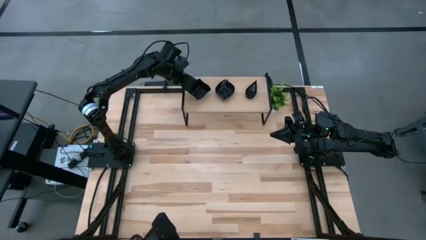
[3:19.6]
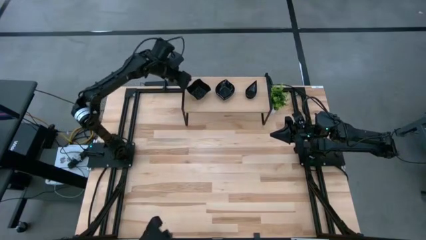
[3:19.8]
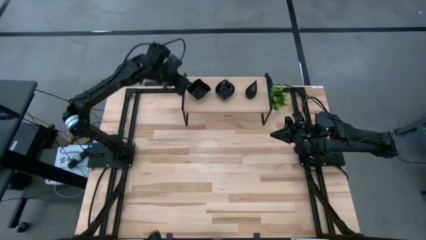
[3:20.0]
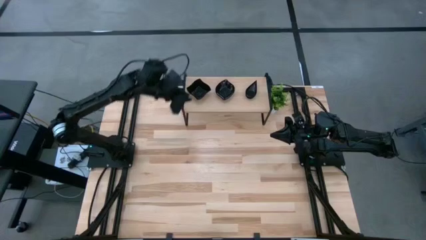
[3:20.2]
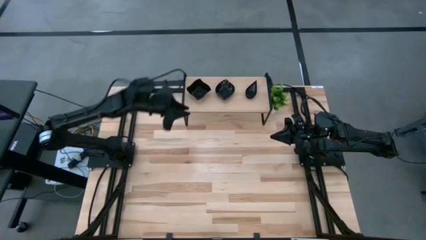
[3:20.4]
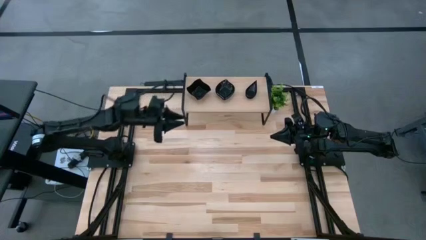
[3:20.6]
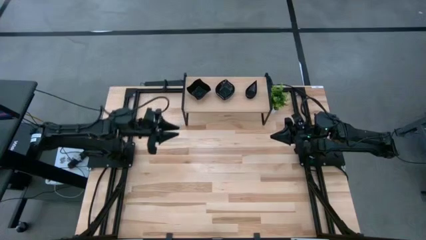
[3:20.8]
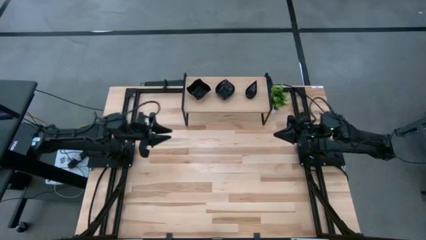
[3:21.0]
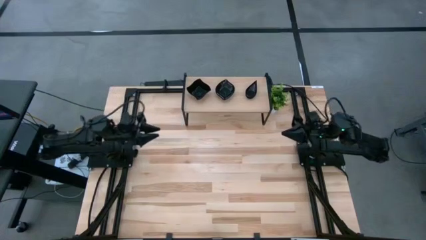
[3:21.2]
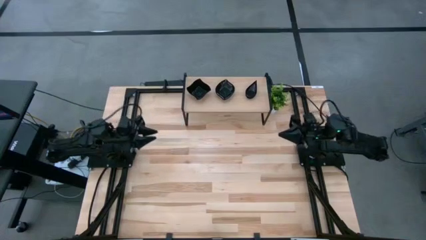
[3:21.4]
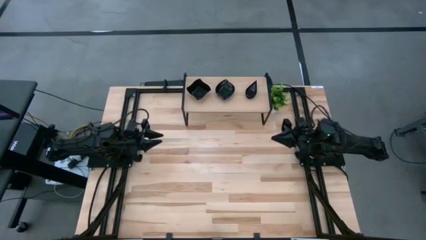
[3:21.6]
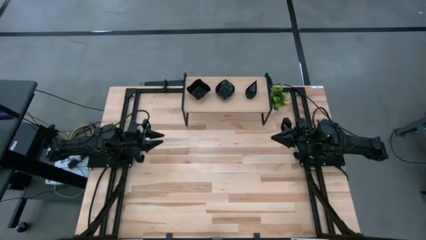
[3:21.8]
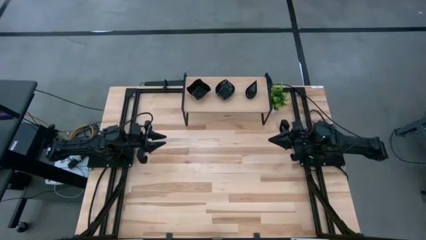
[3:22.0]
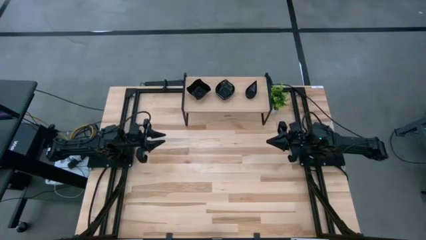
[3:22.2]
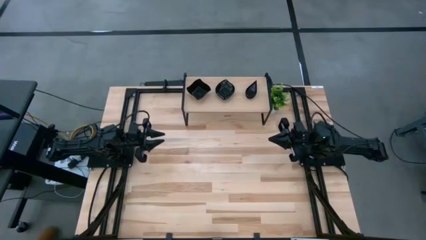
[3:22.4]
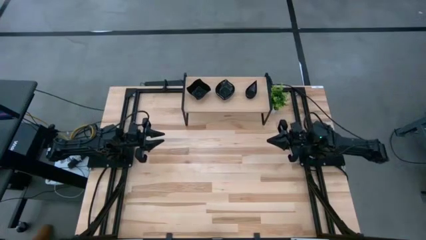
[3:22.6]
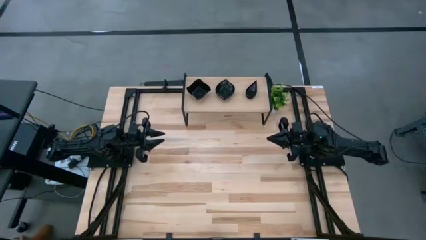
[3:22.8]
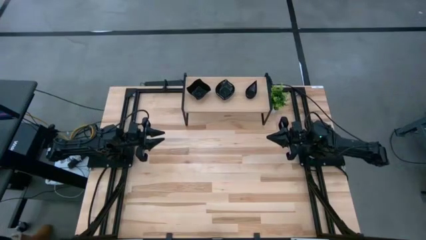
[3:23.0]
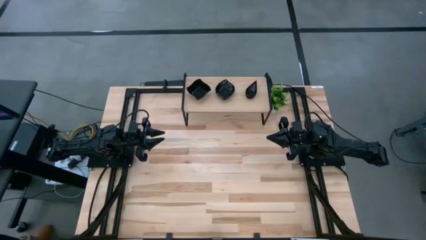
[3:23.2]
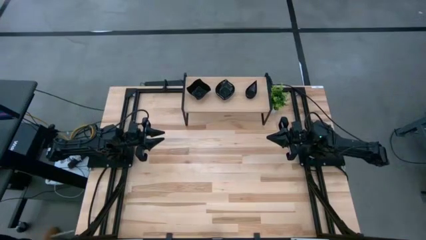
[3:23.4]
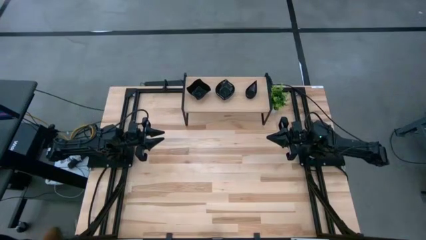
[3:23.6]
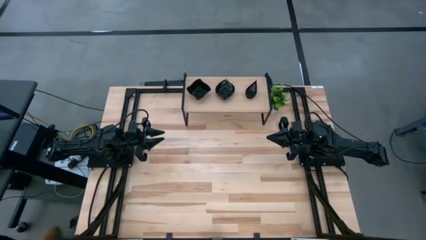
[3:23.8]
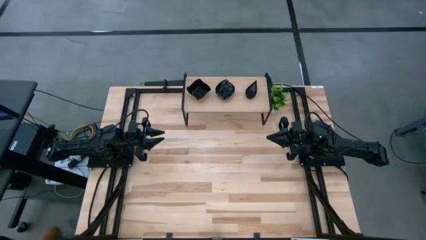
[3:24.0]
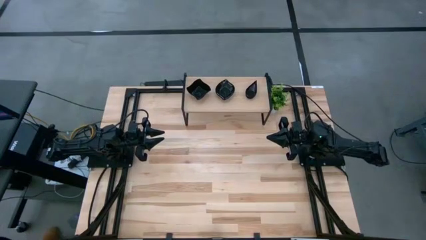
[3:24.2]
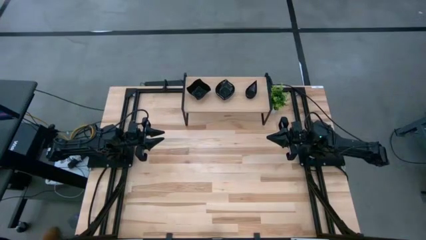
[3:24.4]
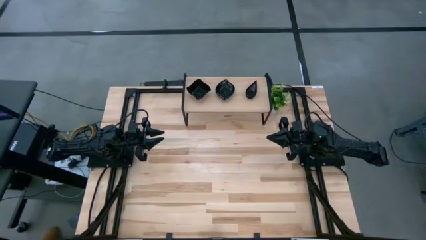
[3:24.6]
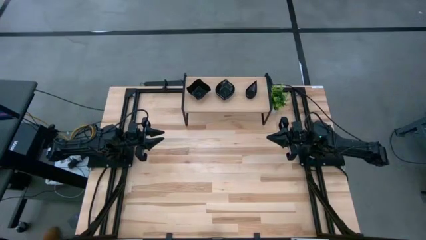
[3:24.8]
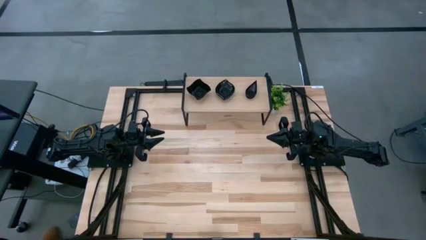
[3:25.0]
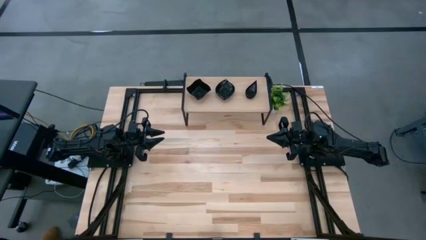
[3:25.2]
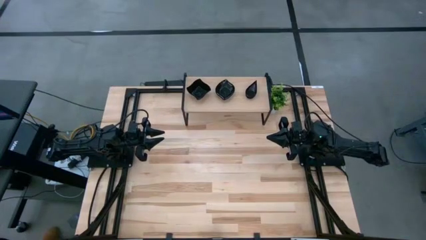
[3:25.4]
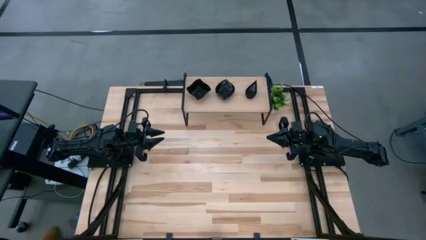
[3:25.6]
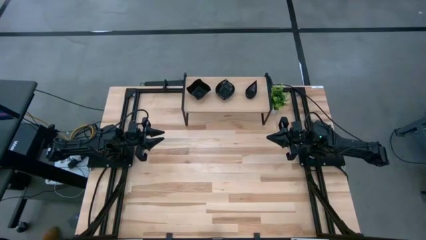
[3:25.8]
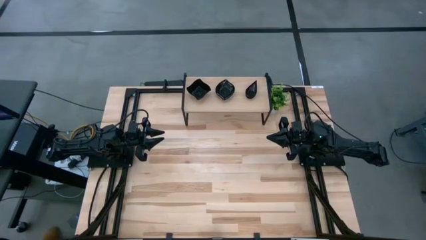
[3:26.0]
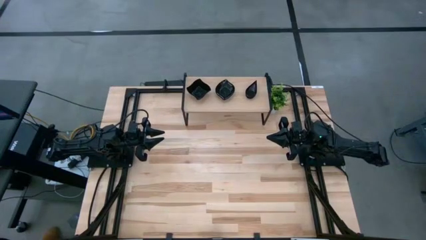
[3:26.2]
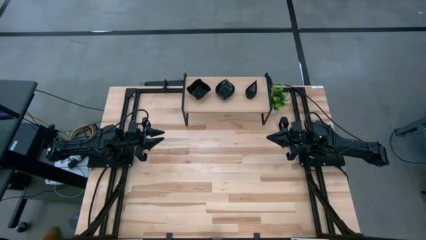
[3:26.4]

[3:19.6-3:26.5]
Task: Pick & Place Mini shaped plates
Return to Home Position

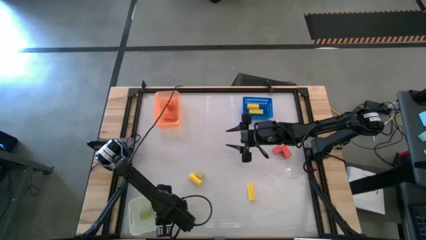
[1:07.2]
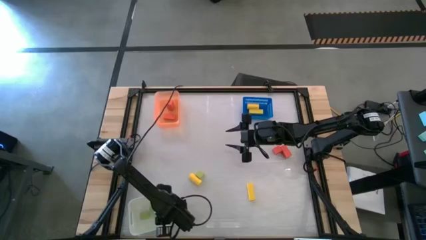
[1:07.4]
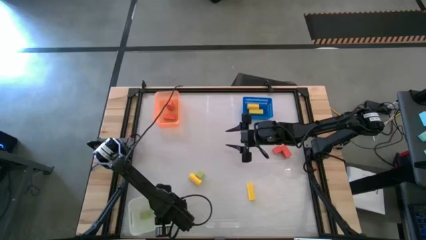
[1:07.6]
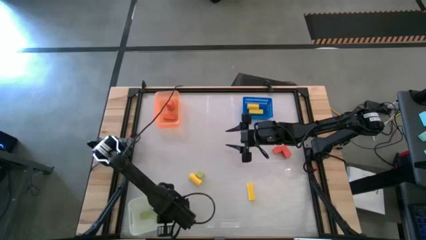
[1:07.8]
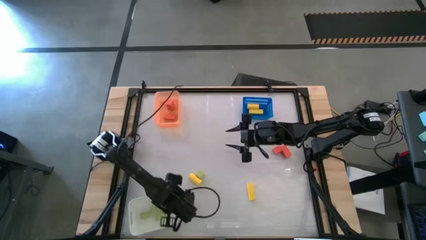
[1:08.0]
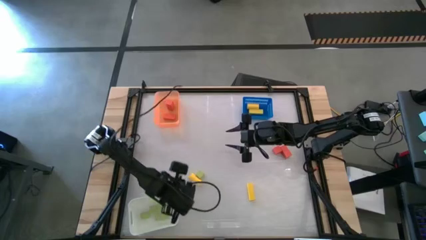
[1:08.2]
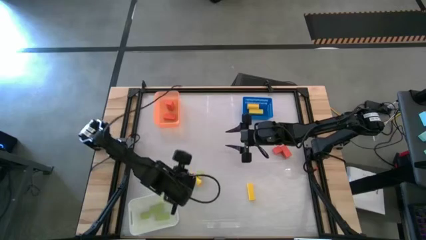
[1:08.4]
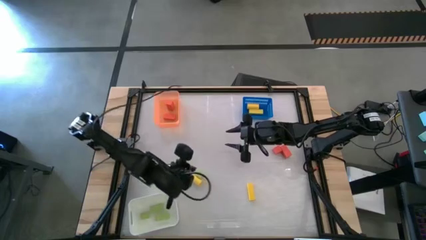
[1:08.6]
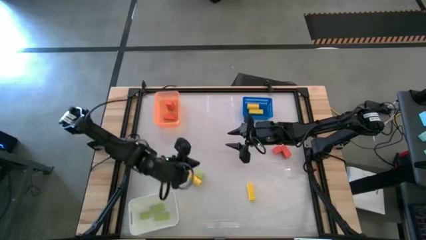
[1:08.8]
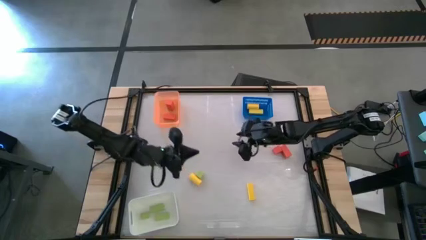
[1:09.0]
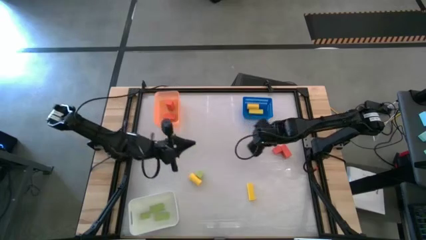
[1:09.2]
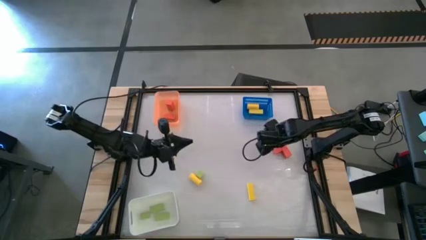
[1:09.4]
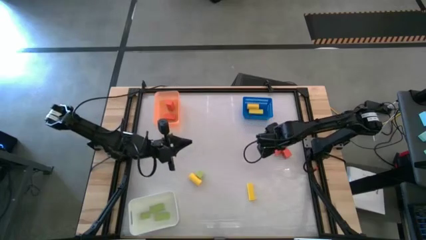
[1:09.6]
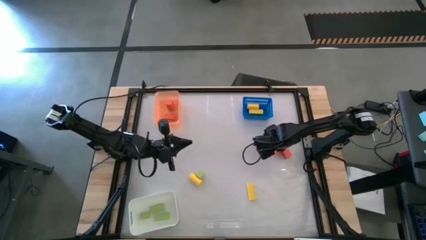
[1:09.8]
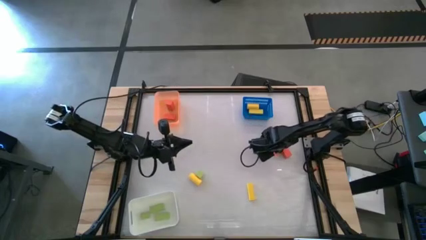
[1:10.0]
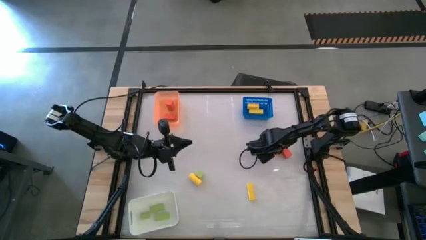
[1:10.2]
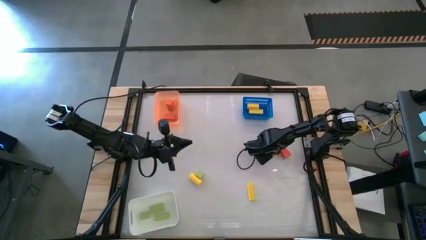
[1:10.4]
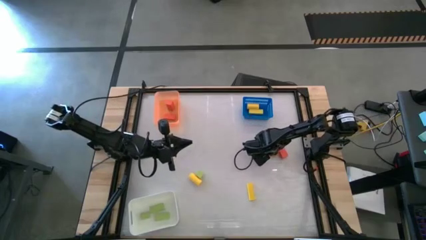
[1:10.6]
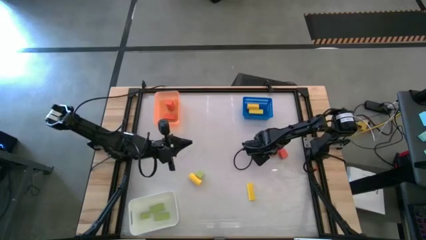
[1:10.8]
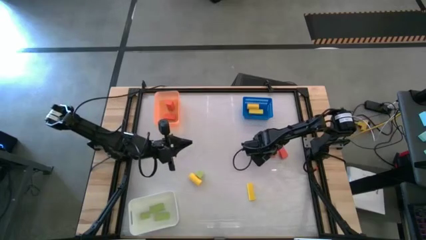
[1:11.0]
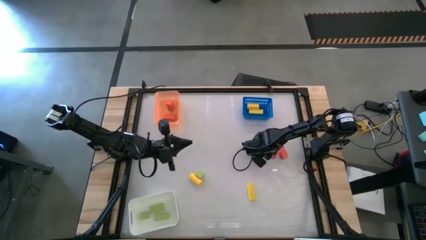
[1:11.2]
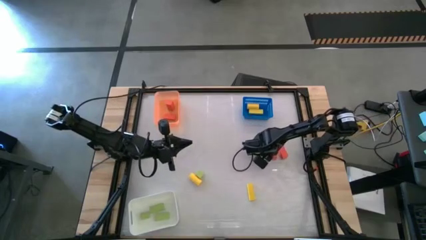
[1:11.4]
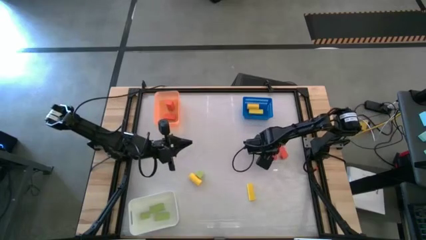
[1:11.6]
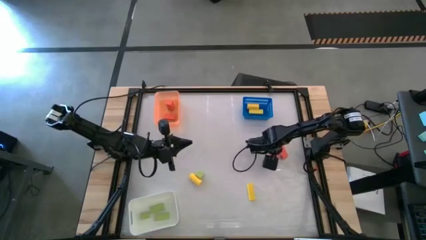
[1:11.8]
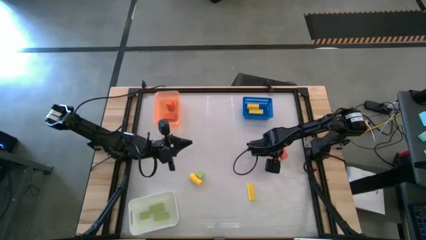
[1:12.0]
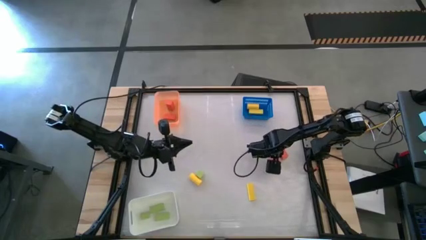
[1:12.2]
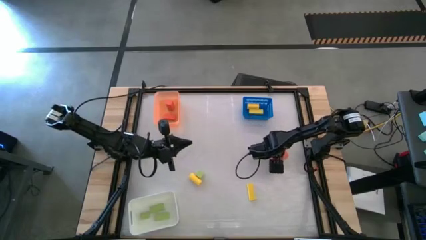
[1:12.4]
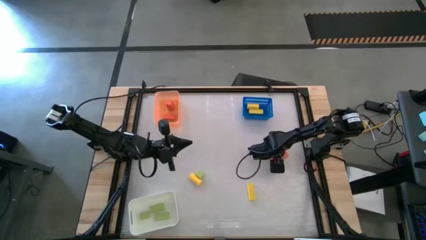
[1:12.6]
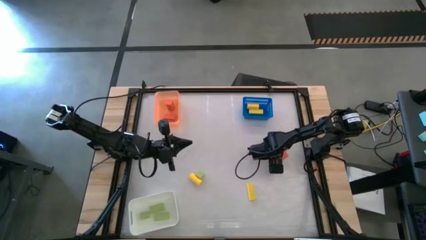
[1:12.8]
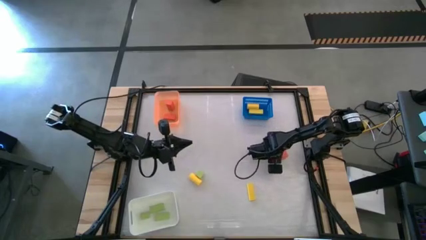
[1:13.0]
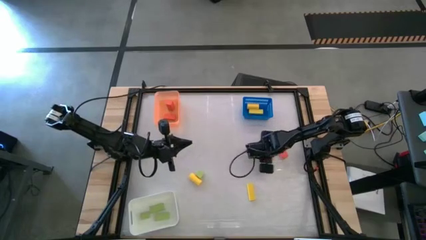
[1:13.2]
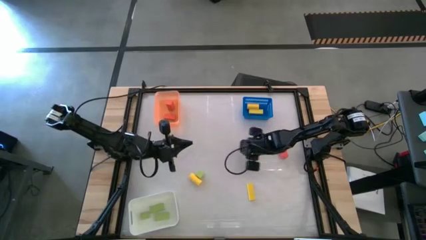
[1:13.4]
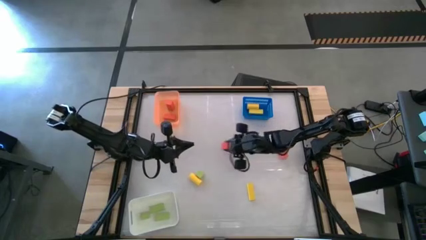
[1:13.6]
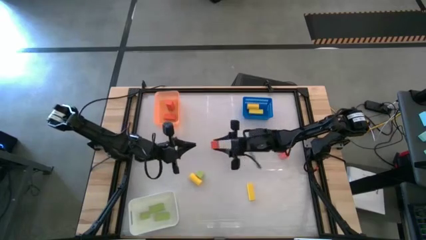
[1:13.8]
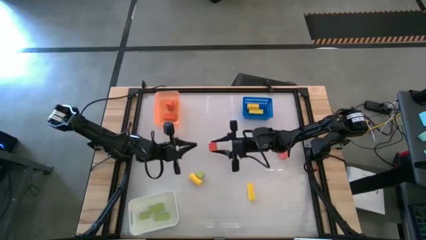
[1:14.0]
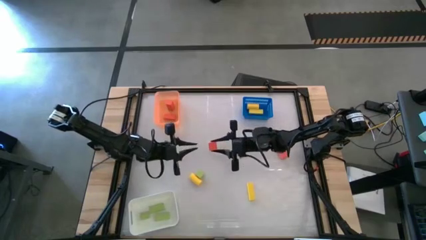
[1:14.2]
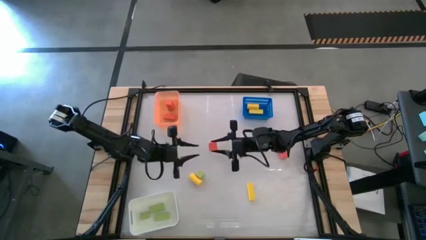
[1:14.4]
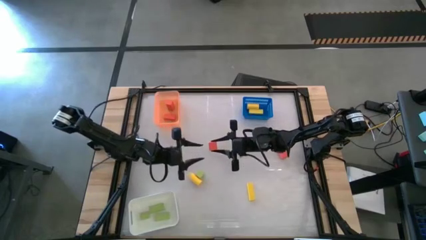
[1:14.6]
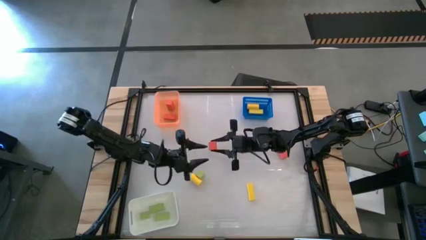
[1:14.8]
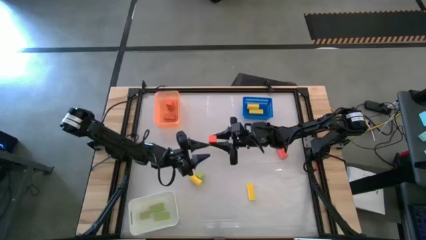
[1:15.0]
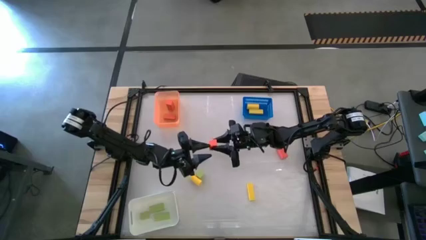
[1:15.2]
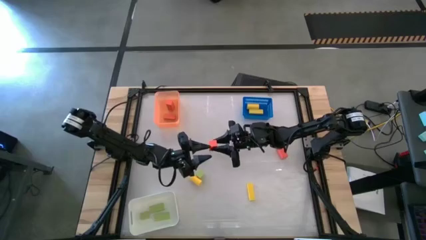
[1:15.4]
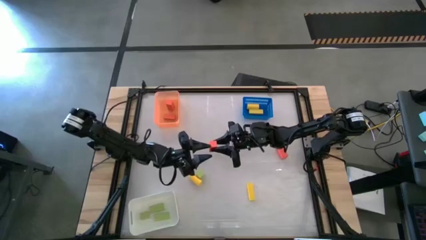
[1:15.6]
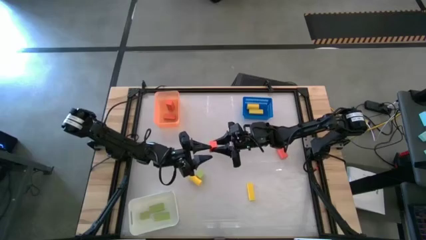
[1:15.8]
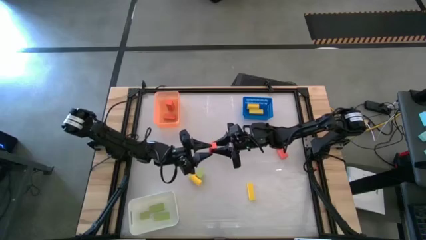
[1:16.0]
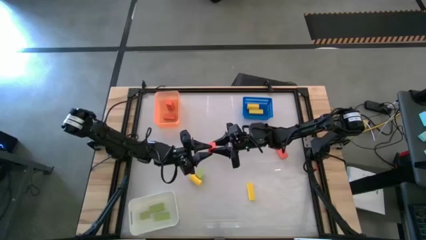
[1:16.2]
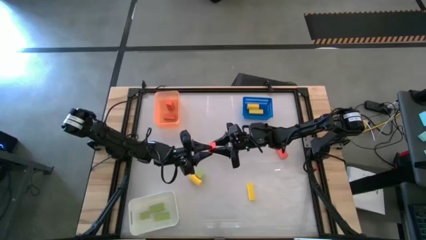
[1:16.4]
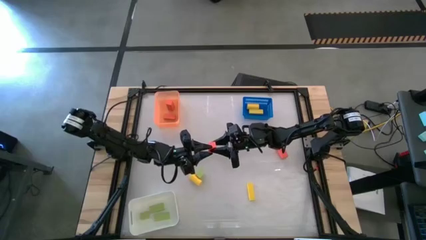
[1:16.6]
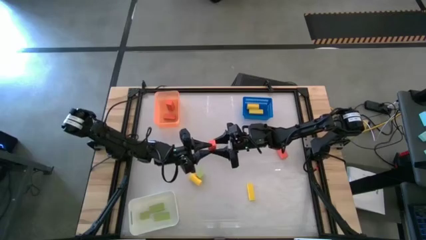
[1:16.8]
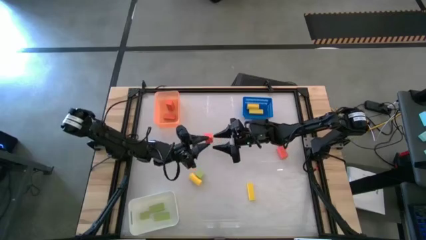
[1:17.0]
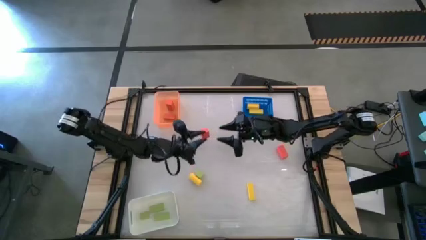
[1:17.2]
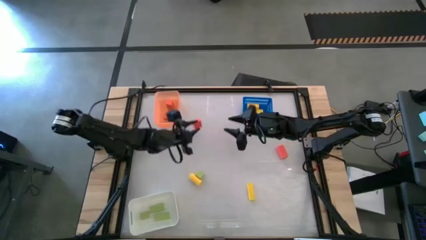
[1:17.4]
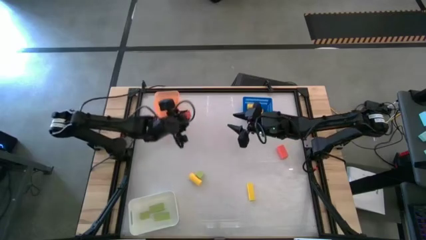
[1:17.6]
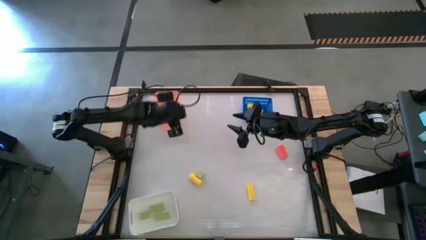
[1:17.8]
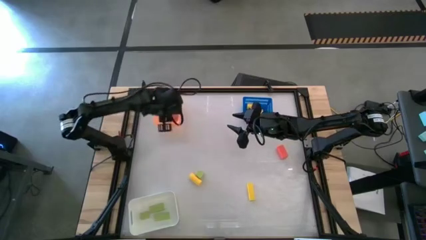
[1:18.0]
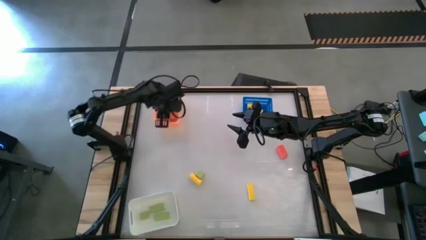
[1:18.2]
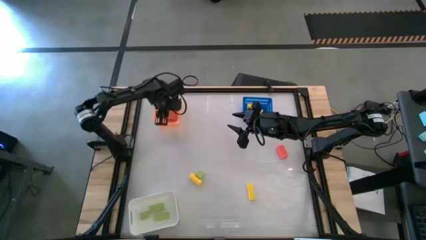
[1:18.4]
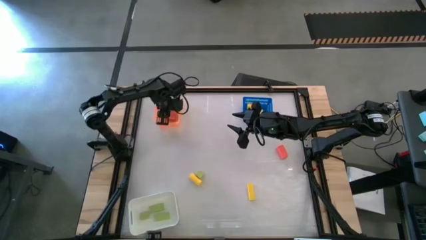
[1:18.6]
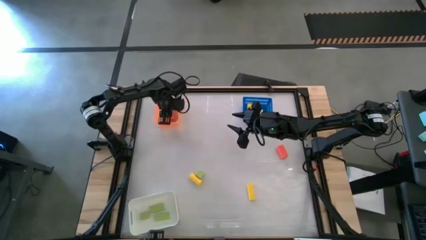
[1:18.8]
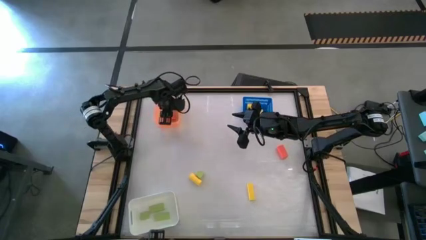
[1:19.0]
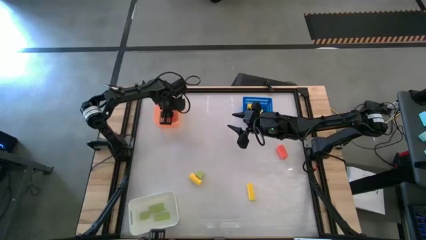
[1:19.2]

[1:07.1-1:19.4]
Task: Sort & place blocks by color
Put the orange wooden block into the orange bin
